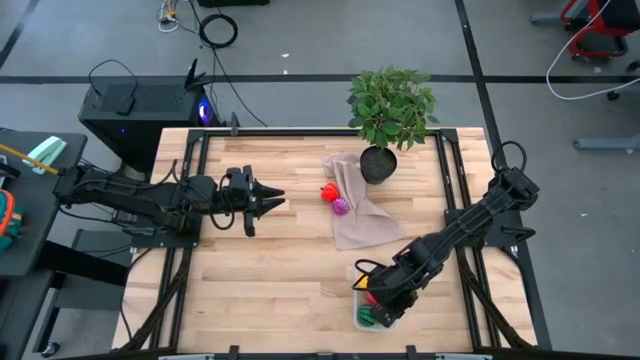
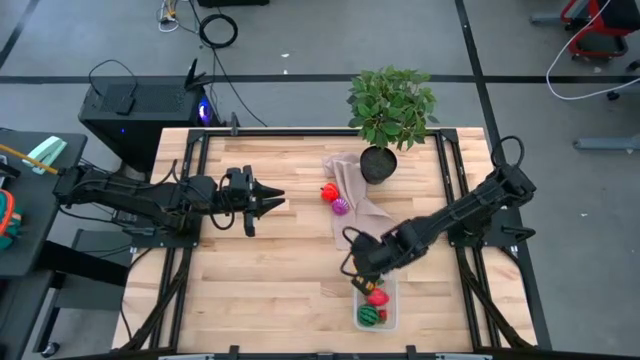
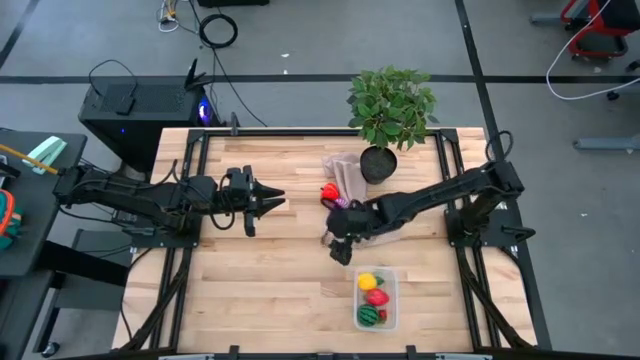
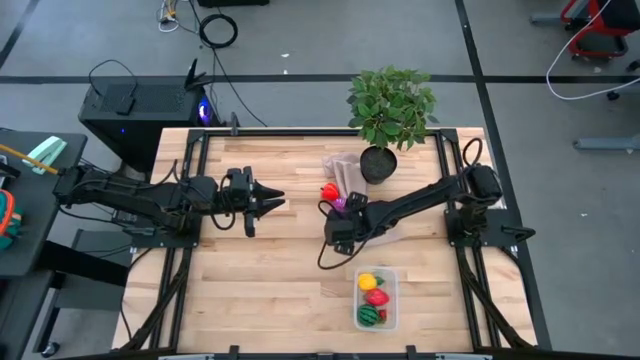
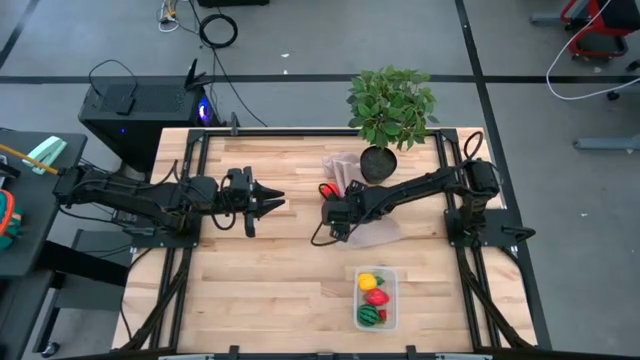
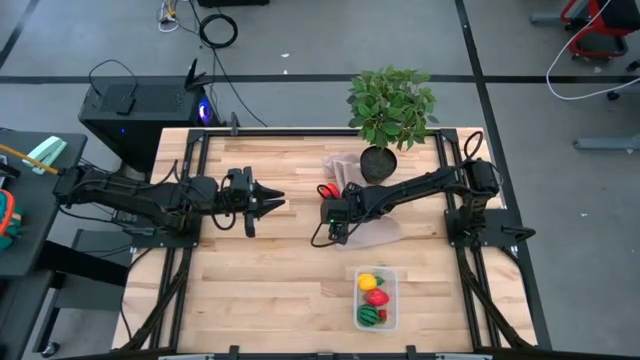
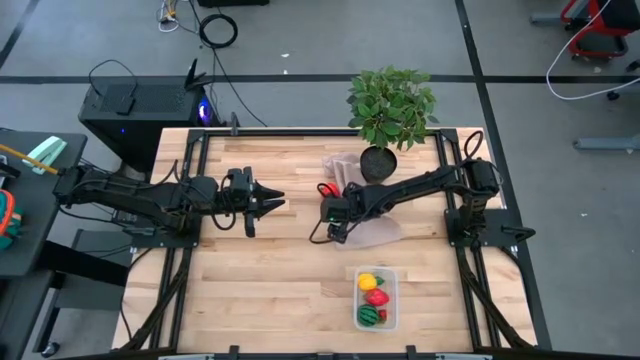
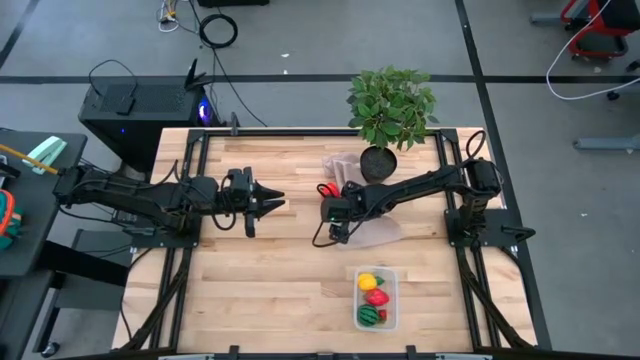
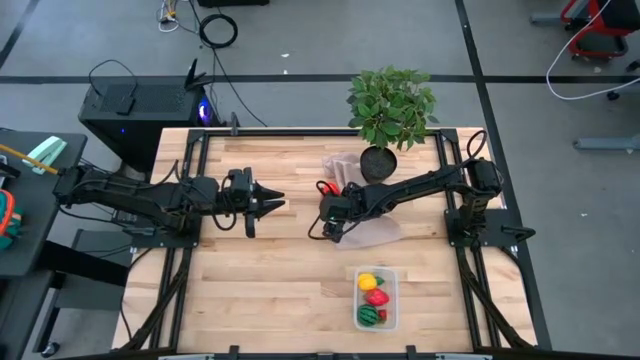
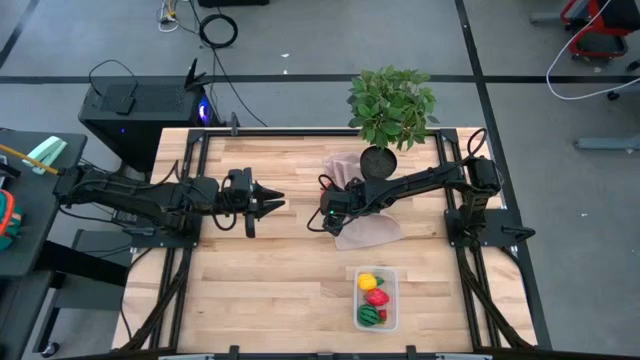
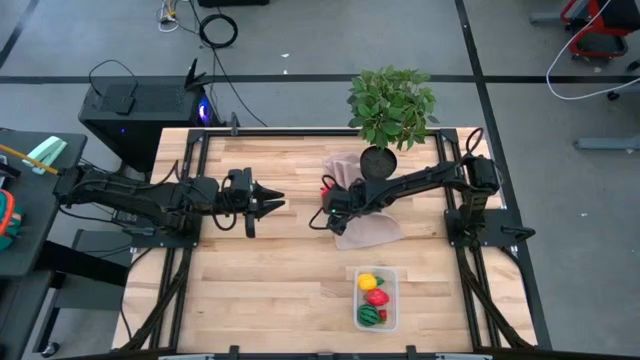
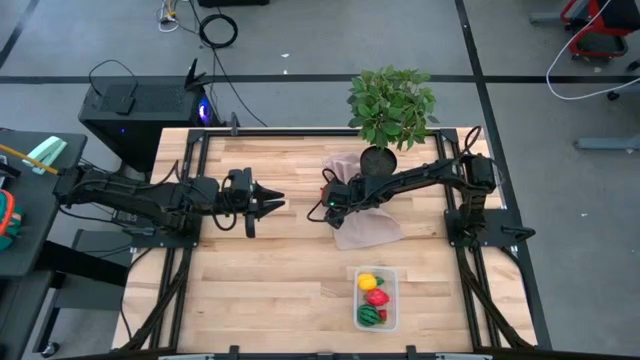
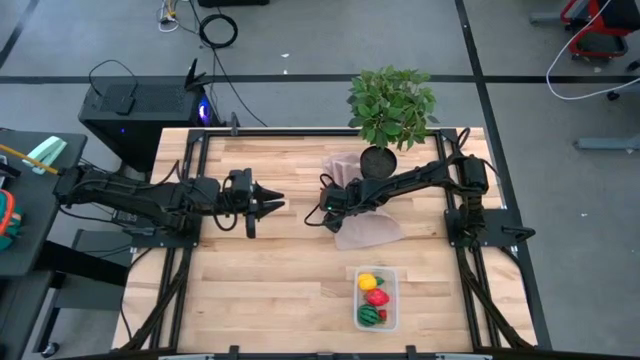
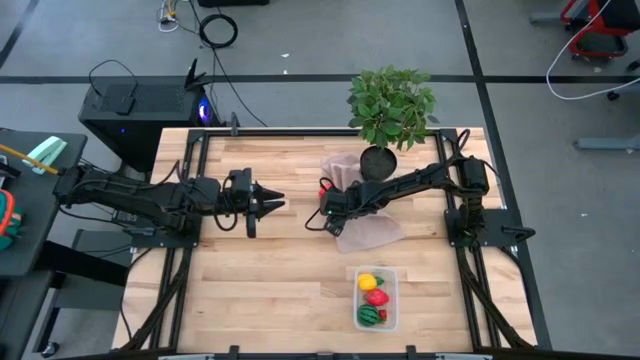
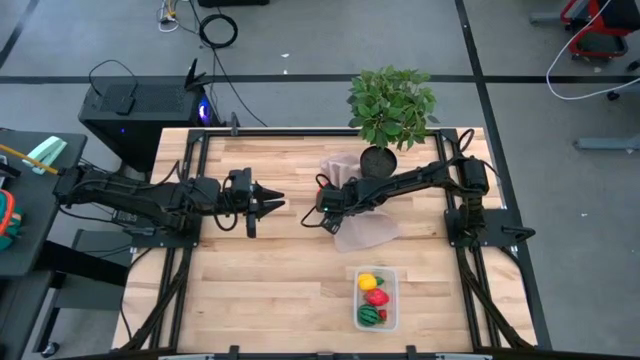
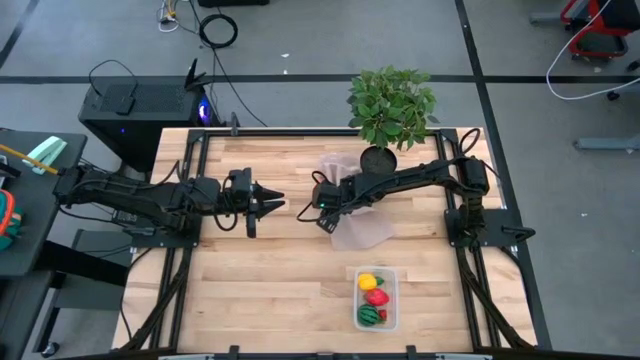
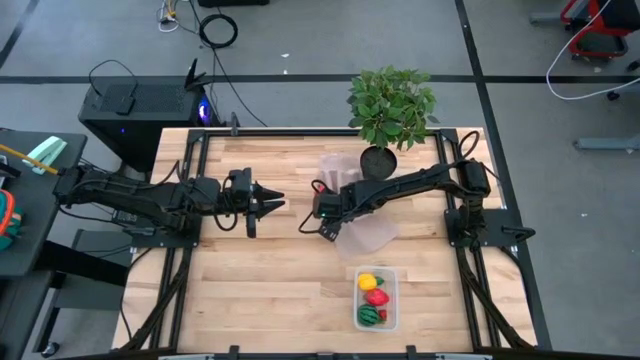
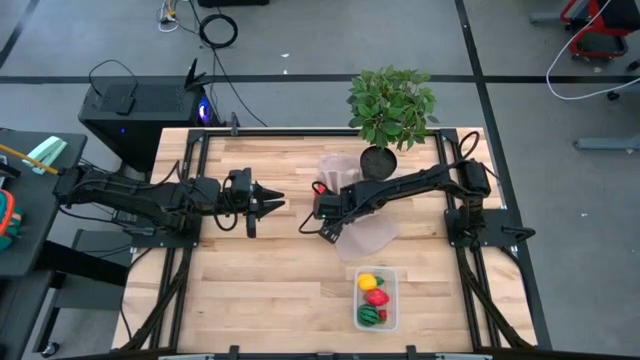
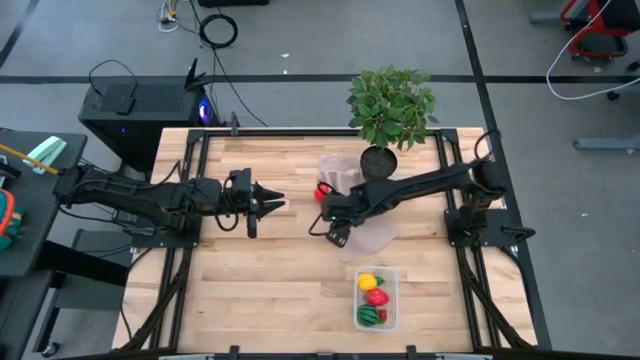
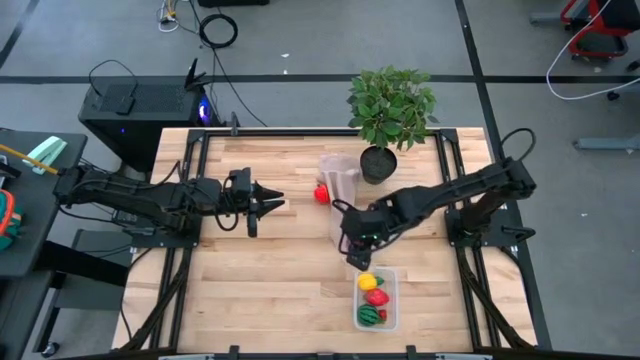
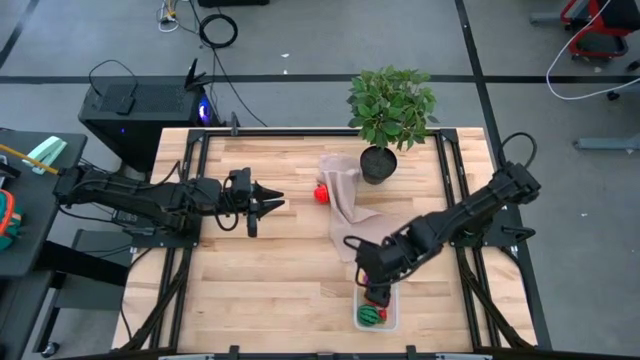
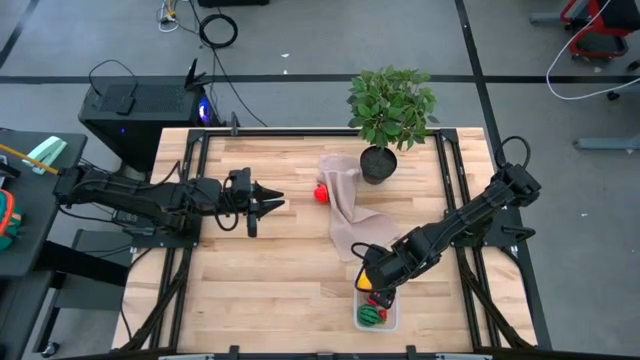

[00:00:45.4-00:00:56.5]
Task: Pick and placing Produce into tupperware
Put the purple onion into the transparent bin

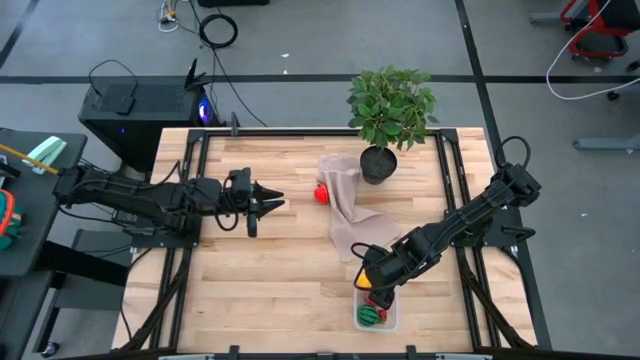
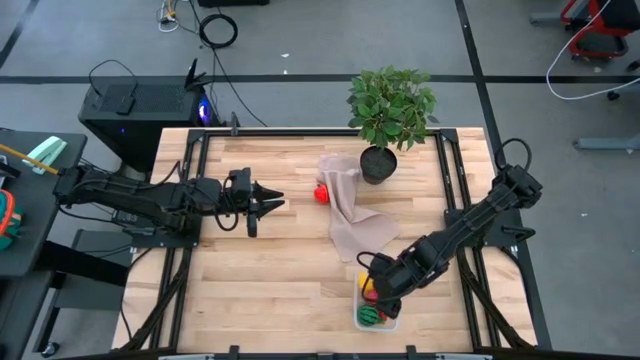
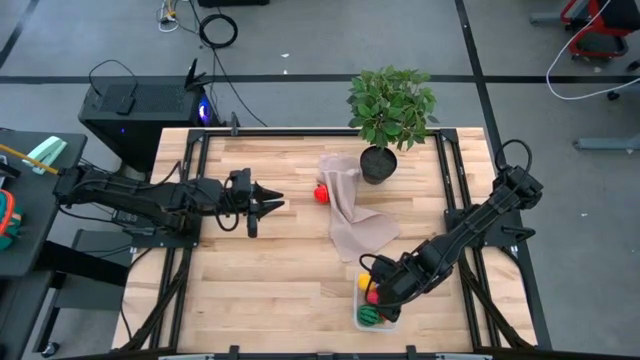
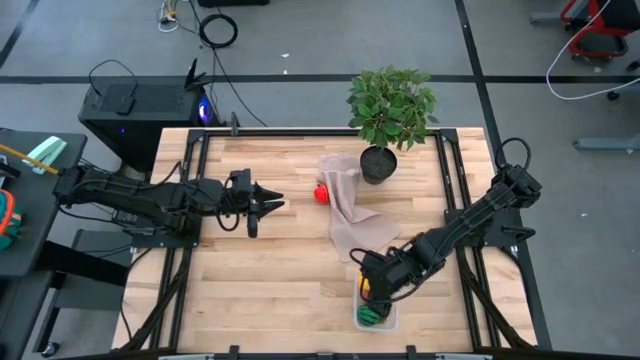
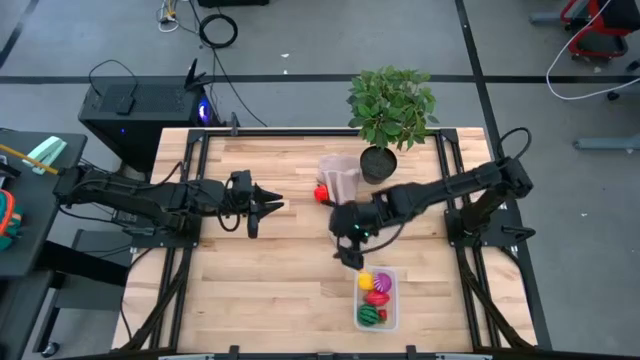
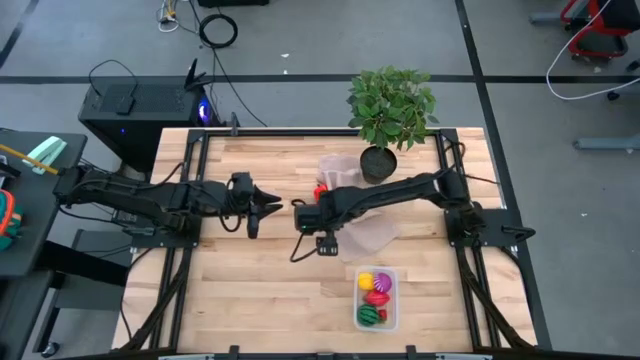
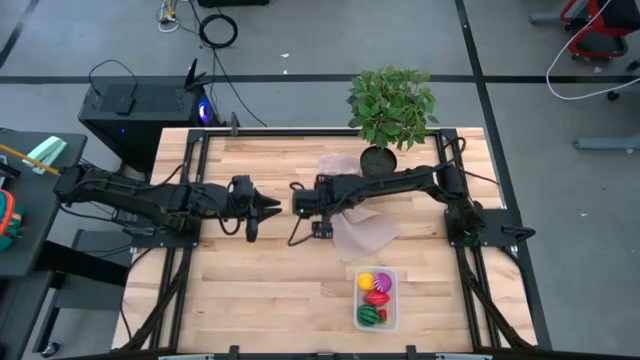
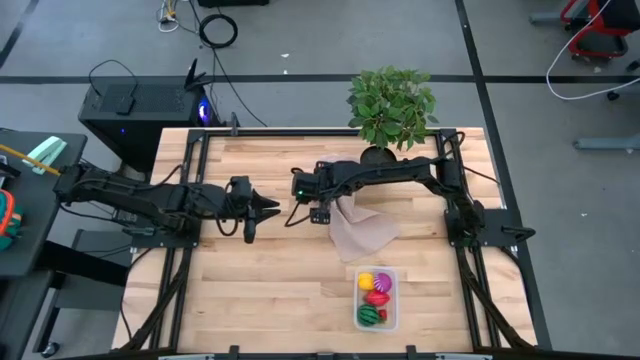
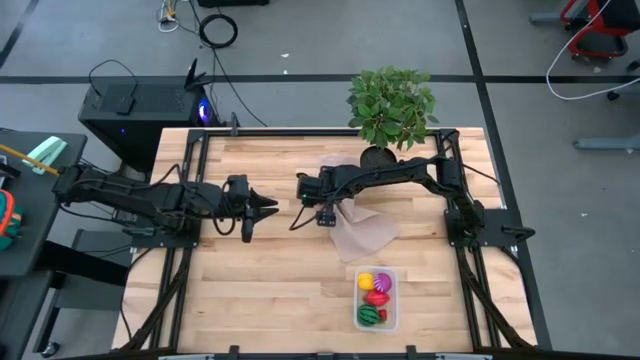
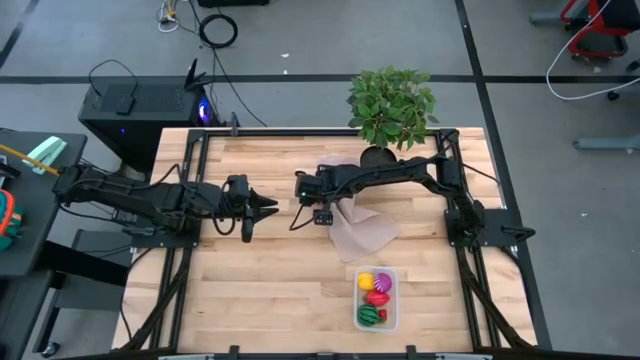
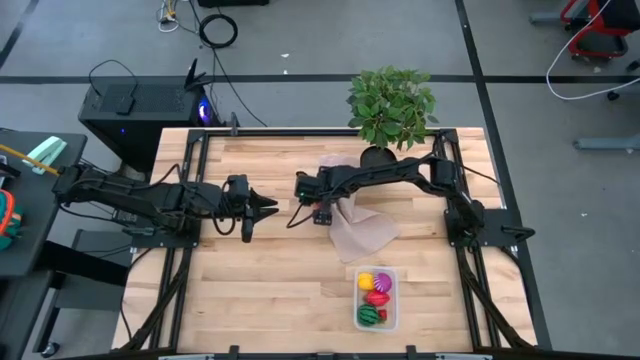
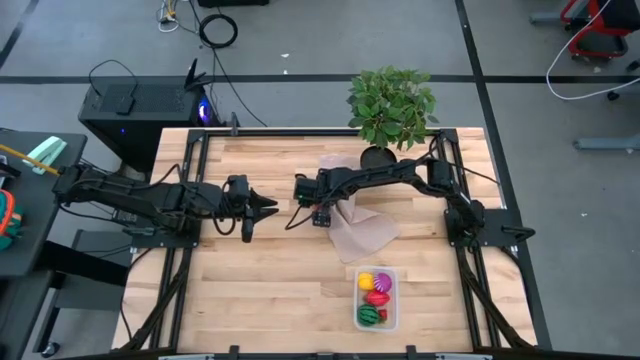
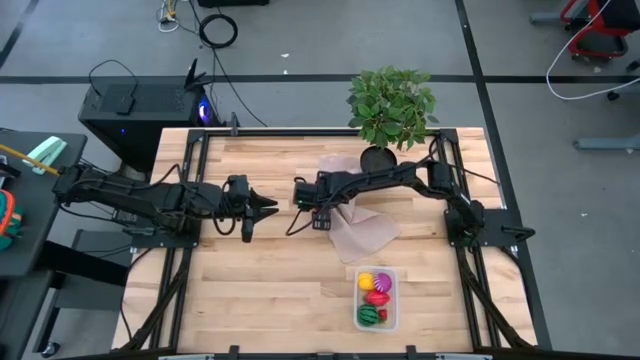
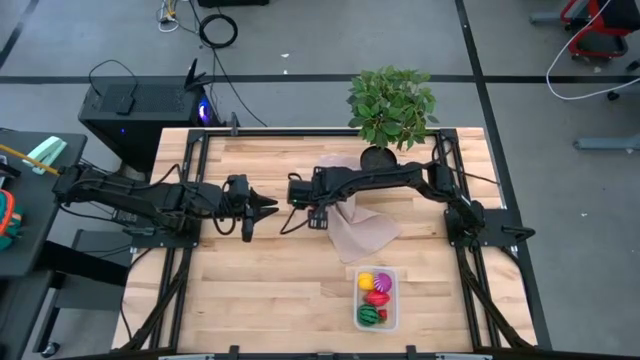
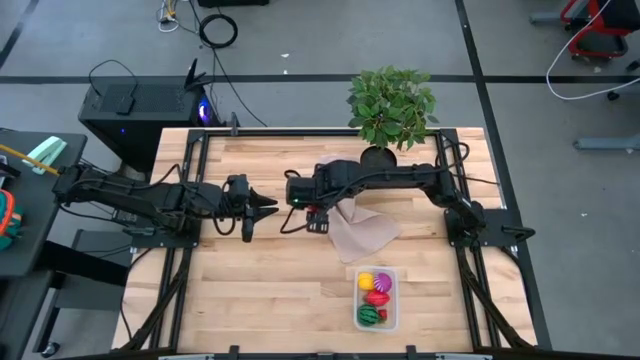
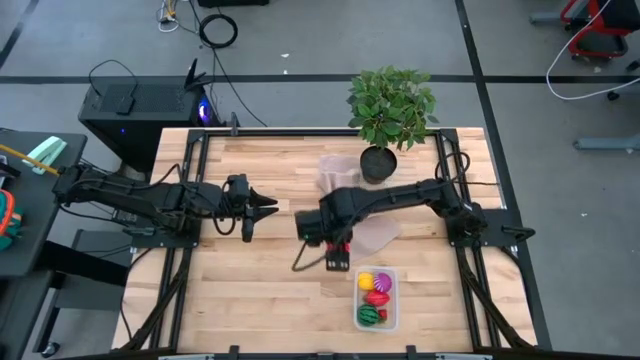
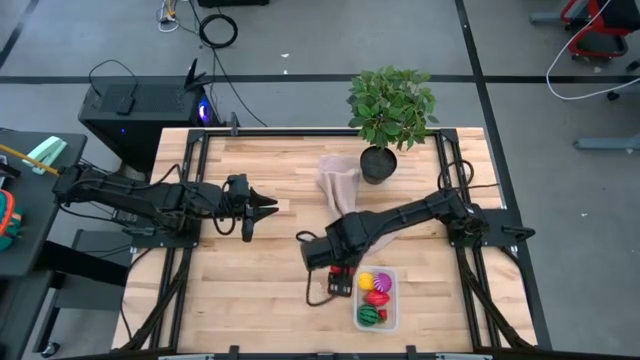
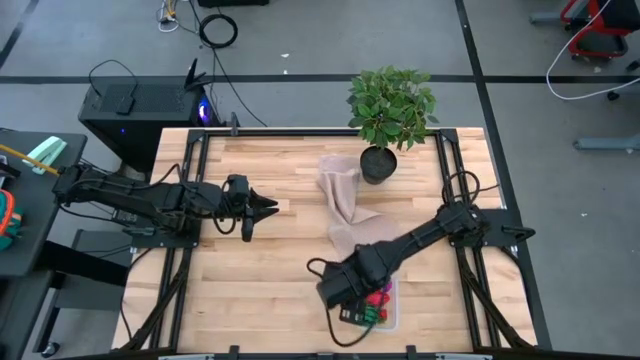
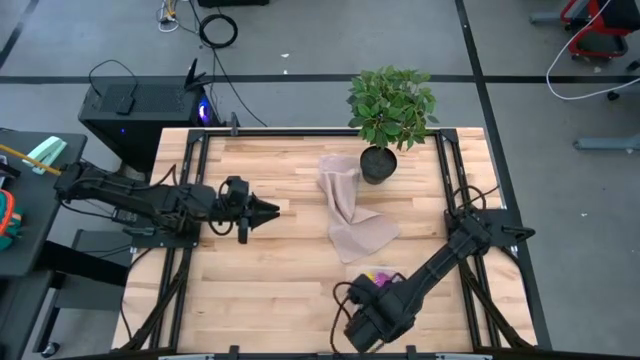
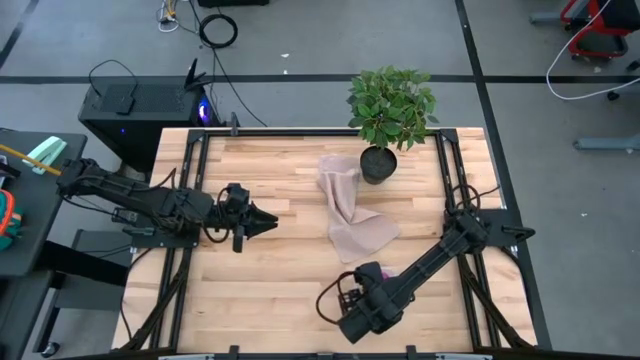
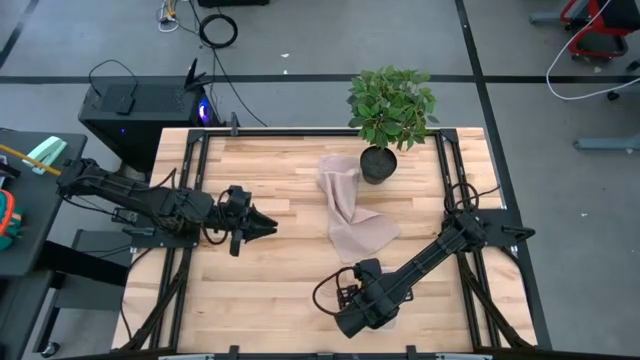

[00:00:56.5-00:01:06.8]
Put the red apple into the transparent bin

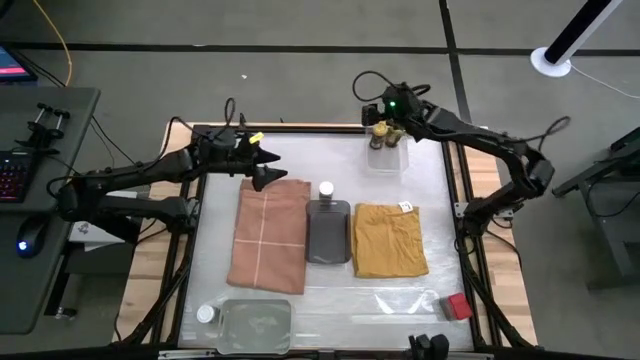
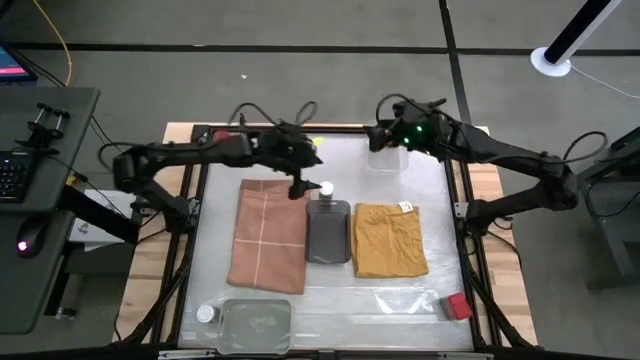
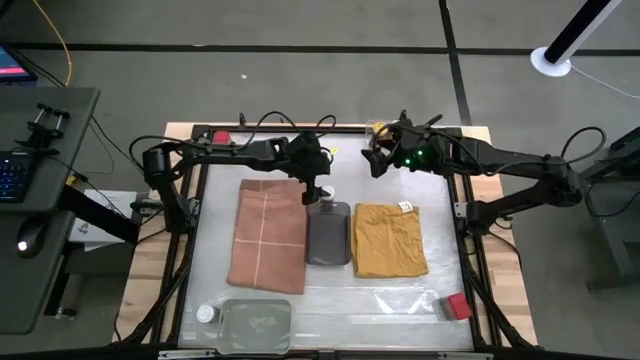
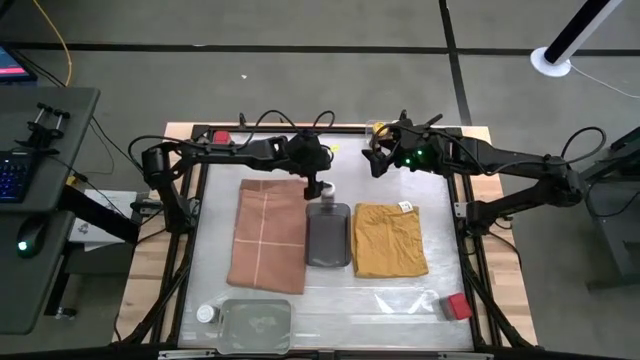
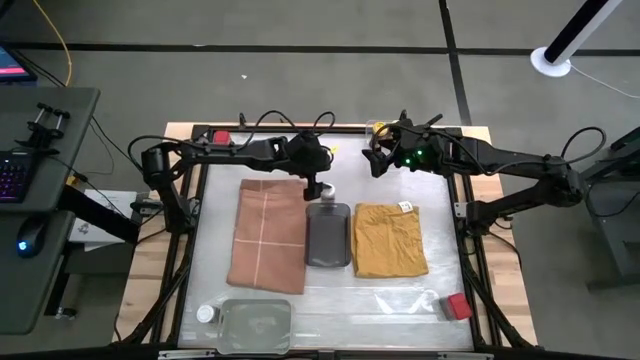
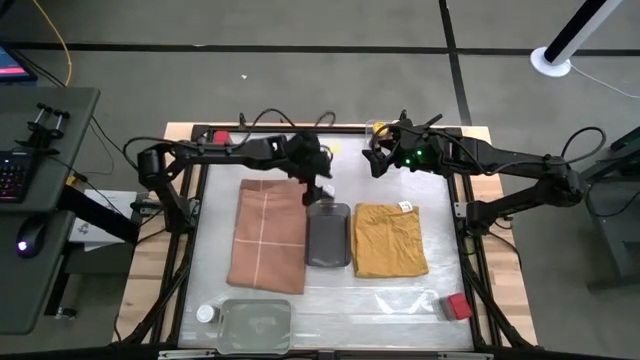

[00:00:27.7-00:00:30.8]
Task: Sort spices by type
Put the top white seasoning bottle into the white bin
